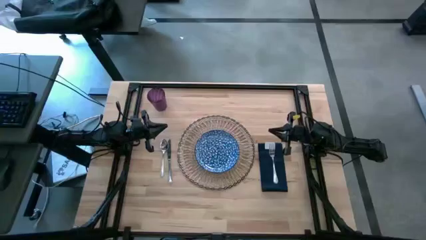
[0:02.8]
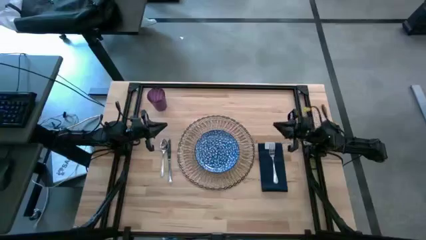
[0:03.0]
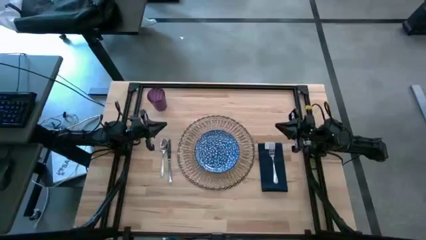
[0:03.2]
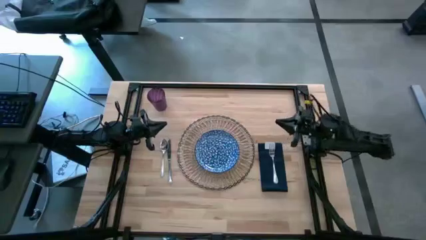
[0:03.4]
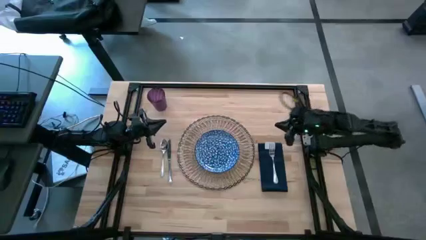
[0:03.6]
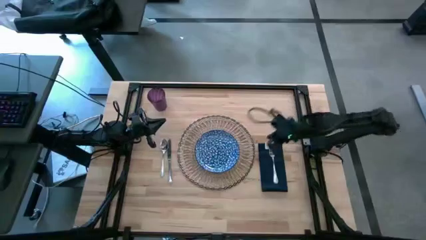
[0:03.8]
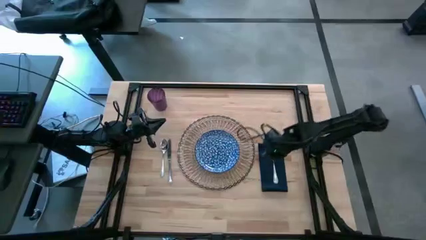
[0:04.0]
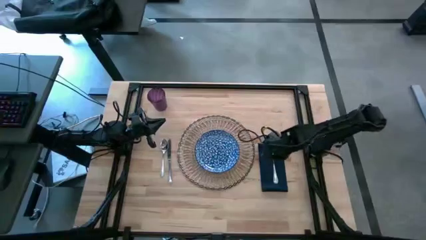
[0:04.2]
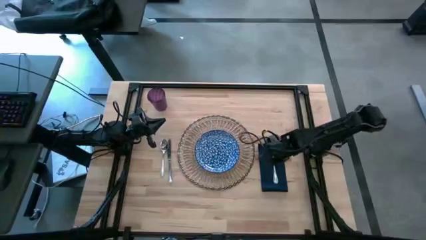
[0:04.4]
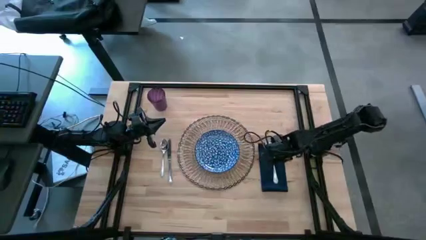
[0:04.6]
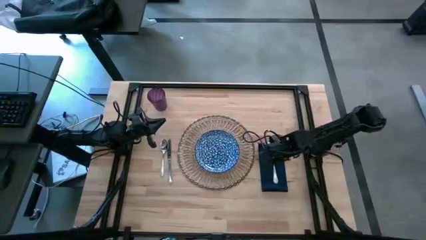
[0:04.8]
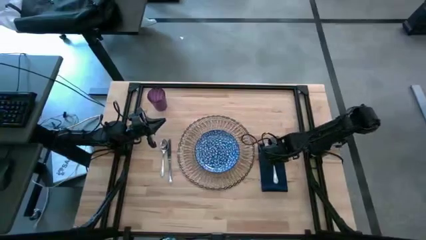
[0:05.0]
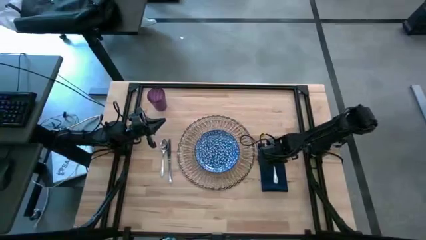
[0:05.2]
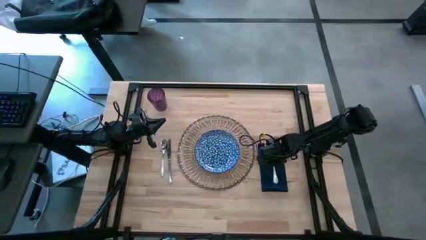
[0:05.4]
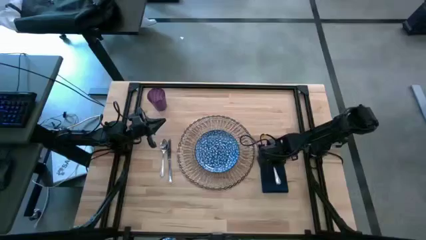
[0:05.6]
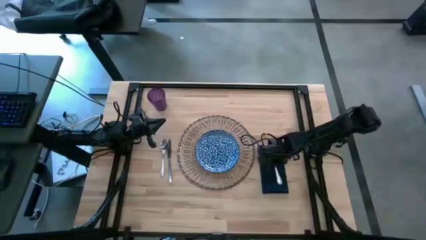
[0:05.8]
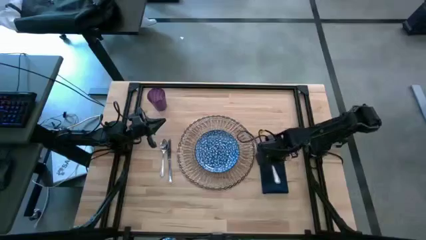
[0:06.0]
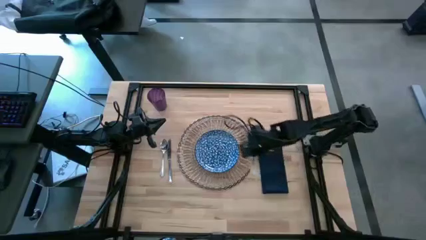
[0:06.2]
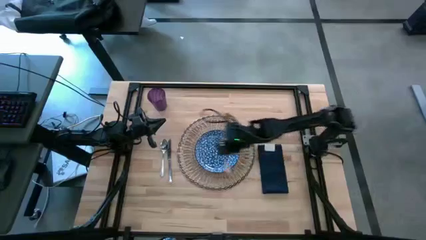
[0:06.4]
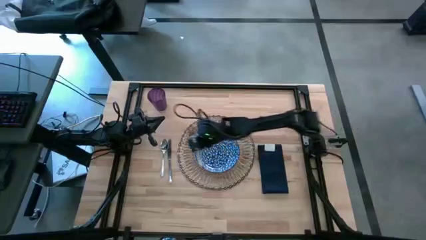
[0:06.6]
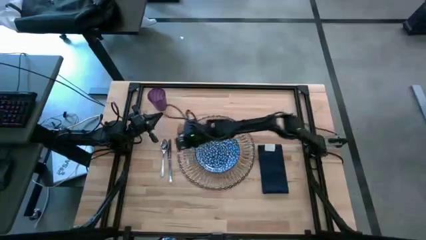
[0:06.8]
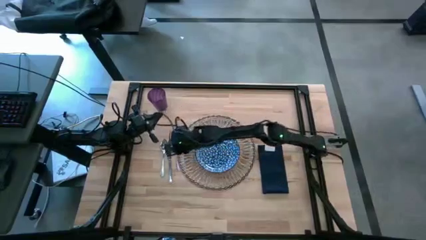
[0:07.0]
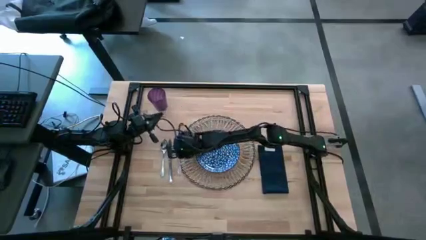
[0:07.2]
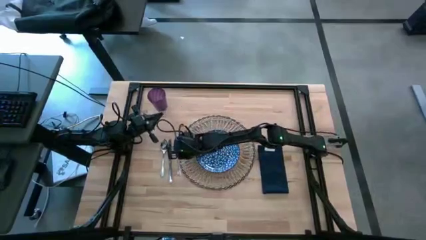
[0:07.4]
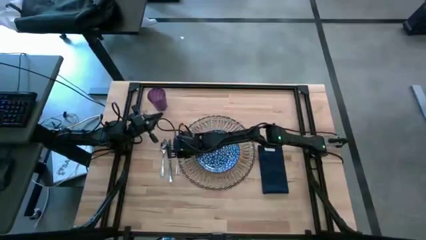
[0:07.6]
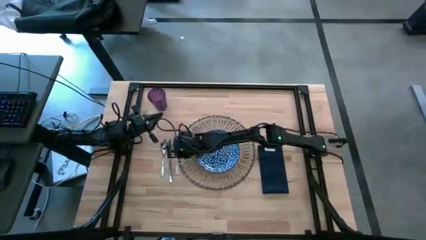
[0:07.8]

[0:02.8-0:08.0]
Task: Set table place
Move the fork beside the knife

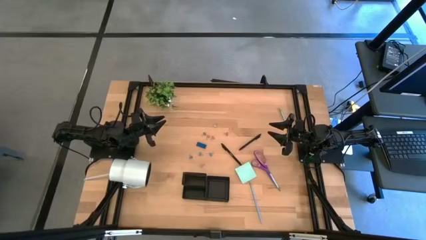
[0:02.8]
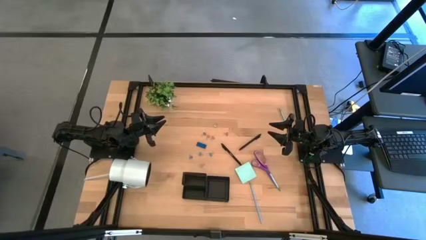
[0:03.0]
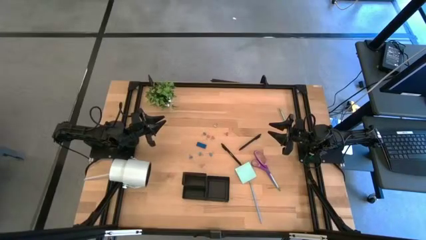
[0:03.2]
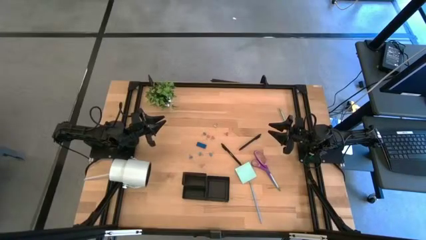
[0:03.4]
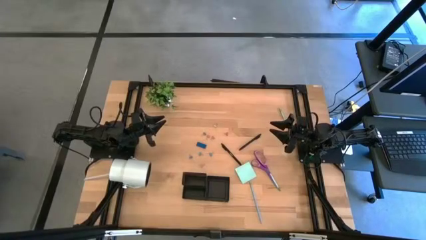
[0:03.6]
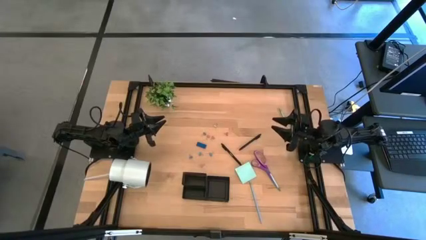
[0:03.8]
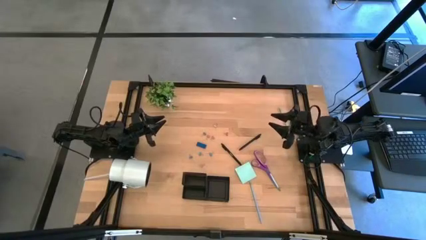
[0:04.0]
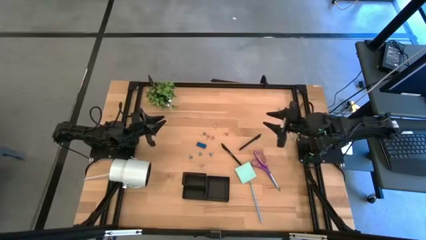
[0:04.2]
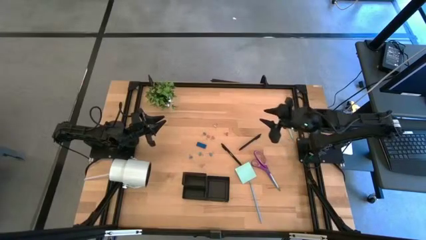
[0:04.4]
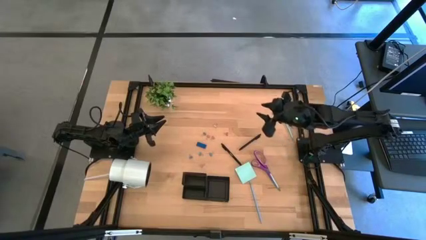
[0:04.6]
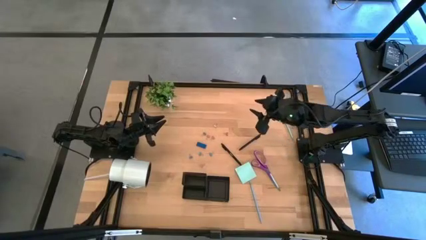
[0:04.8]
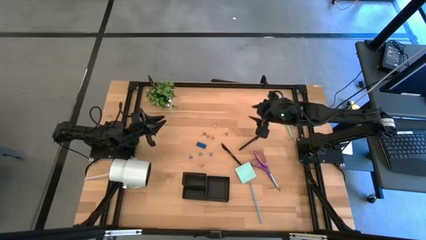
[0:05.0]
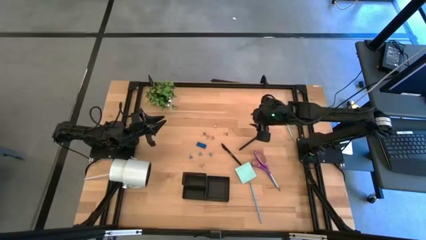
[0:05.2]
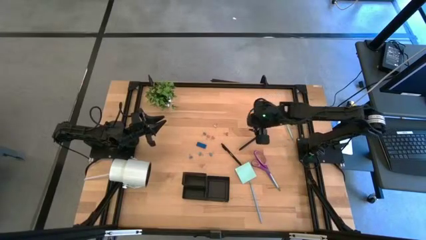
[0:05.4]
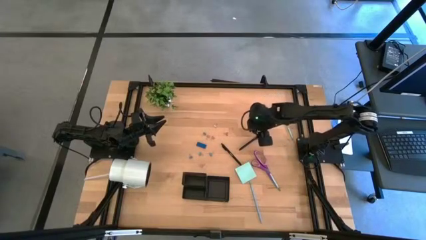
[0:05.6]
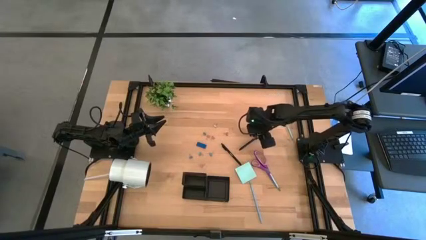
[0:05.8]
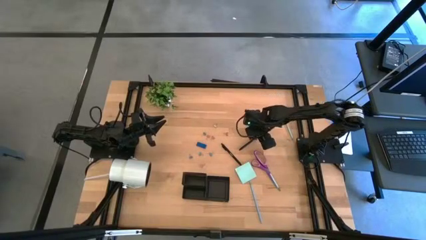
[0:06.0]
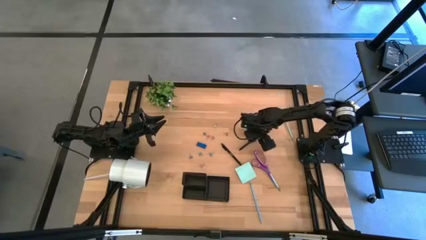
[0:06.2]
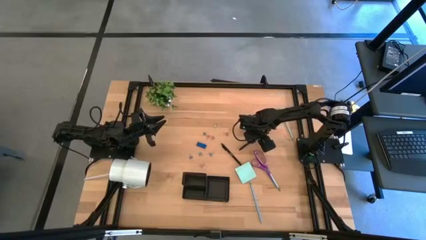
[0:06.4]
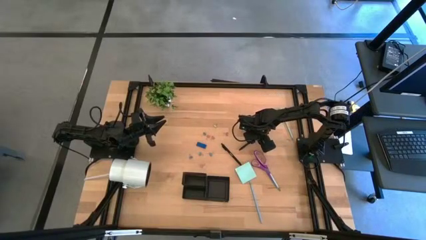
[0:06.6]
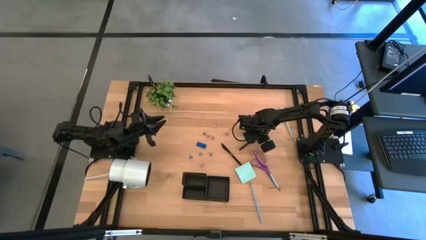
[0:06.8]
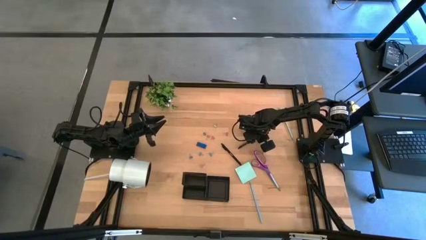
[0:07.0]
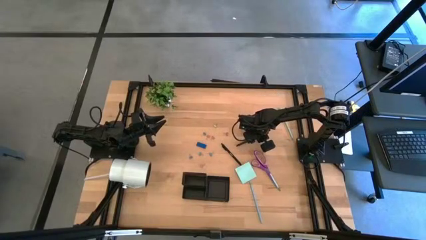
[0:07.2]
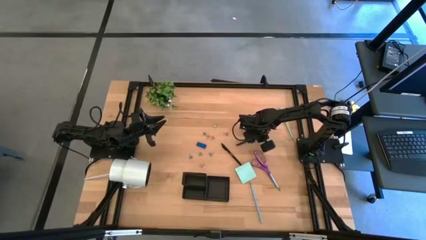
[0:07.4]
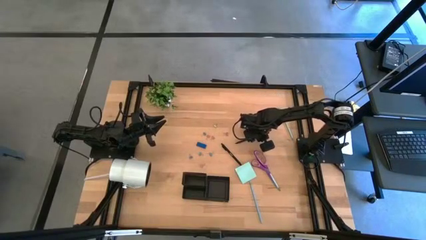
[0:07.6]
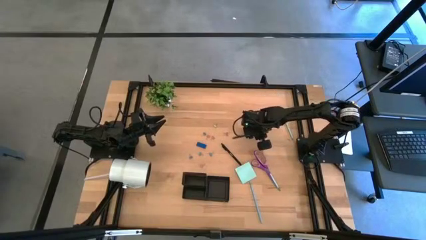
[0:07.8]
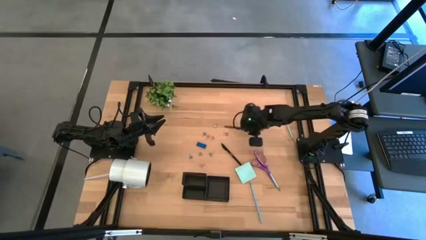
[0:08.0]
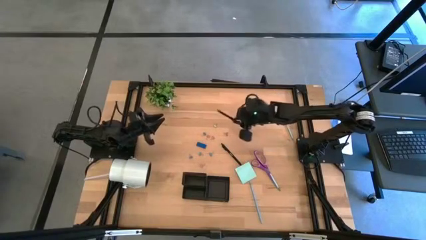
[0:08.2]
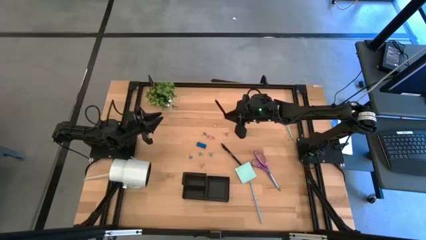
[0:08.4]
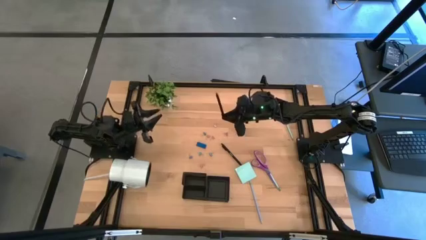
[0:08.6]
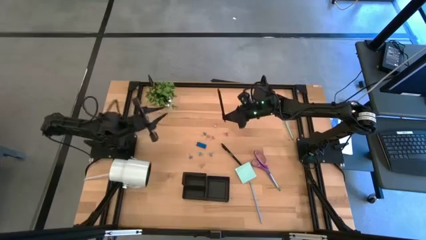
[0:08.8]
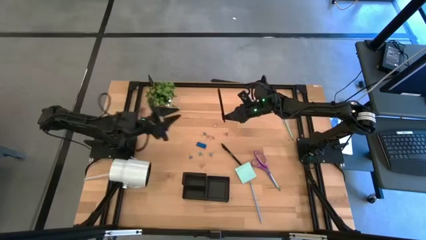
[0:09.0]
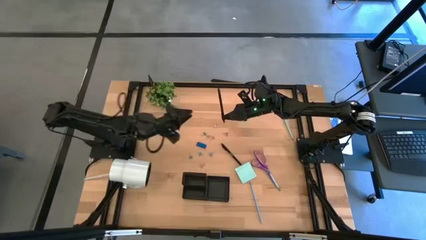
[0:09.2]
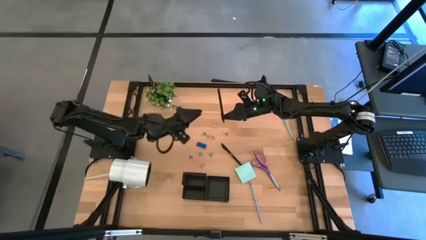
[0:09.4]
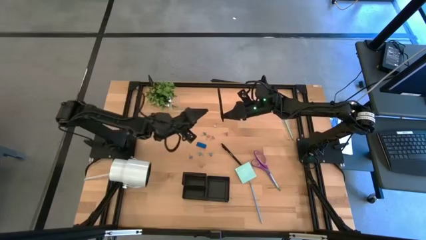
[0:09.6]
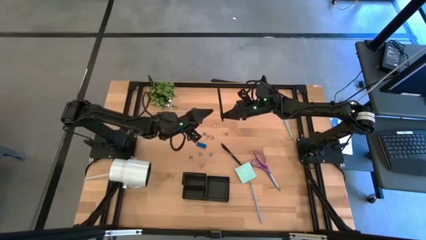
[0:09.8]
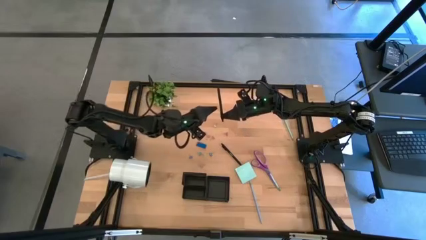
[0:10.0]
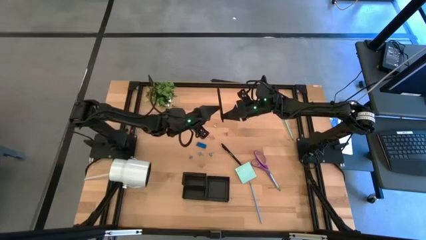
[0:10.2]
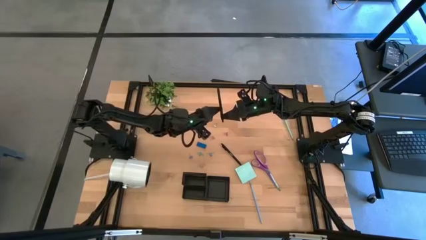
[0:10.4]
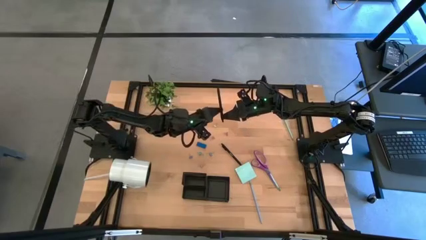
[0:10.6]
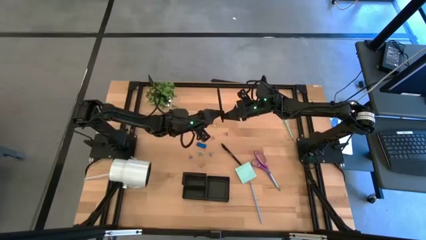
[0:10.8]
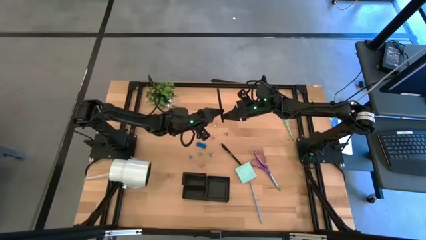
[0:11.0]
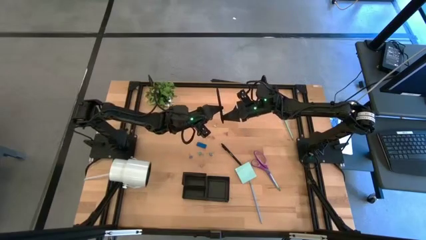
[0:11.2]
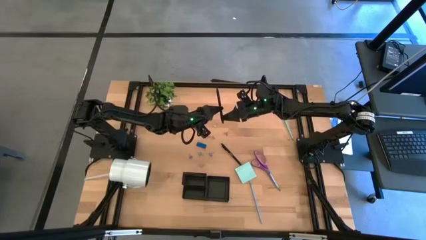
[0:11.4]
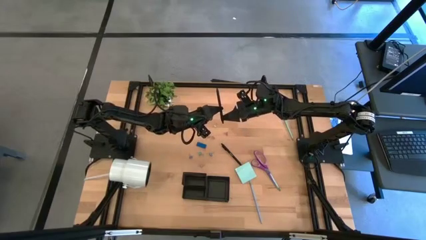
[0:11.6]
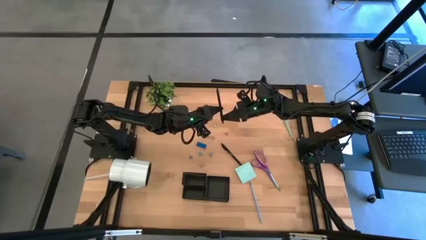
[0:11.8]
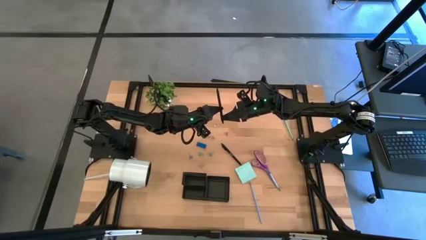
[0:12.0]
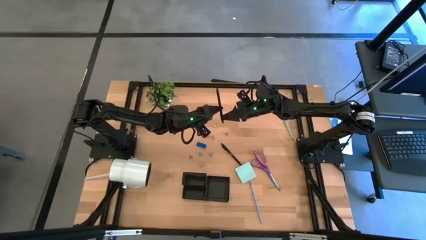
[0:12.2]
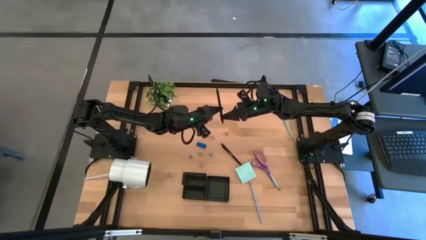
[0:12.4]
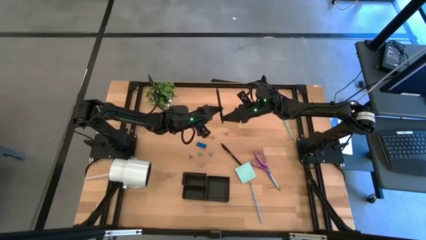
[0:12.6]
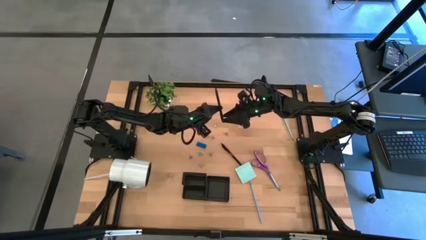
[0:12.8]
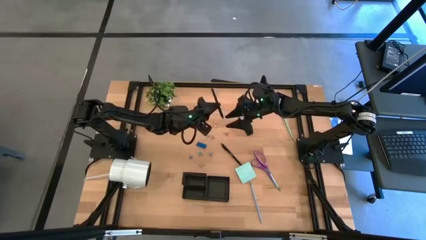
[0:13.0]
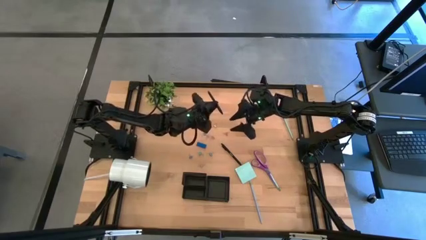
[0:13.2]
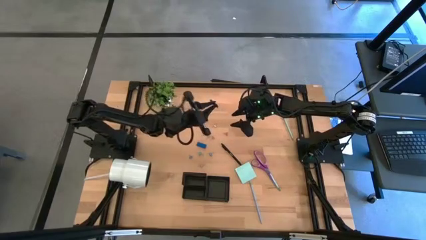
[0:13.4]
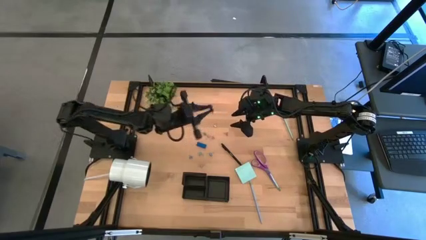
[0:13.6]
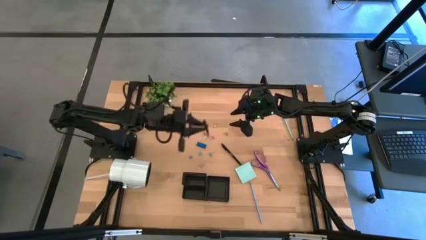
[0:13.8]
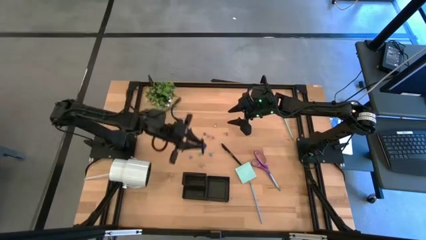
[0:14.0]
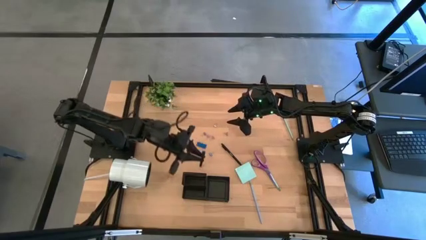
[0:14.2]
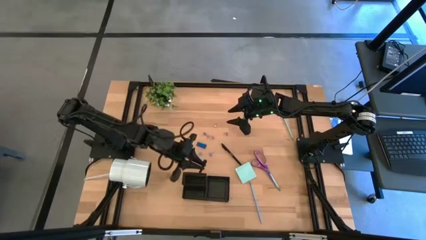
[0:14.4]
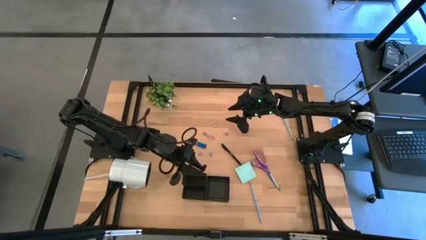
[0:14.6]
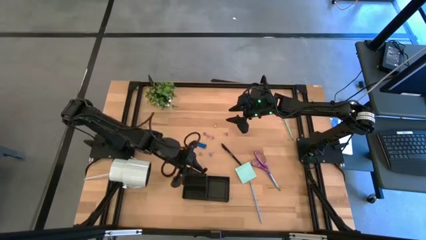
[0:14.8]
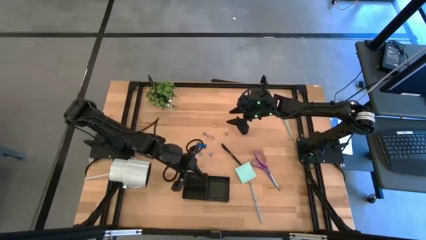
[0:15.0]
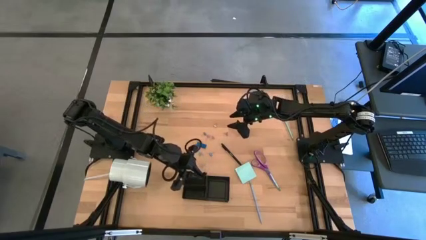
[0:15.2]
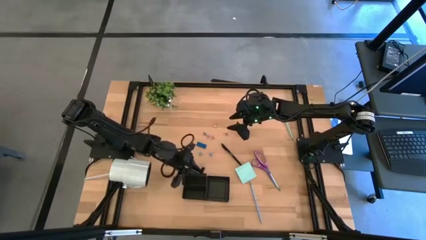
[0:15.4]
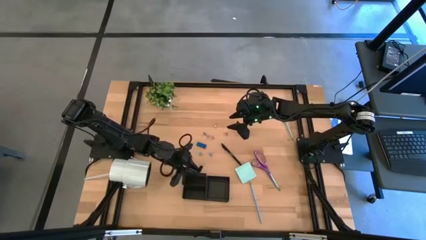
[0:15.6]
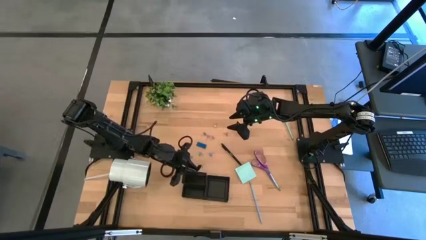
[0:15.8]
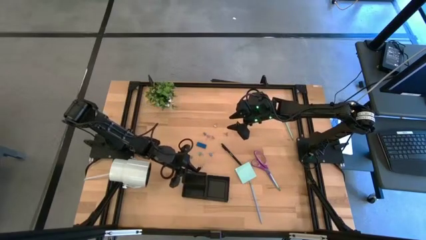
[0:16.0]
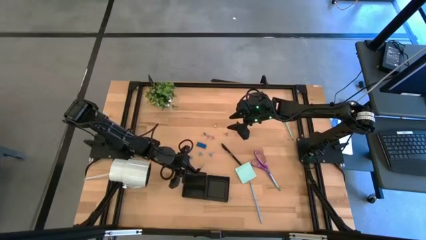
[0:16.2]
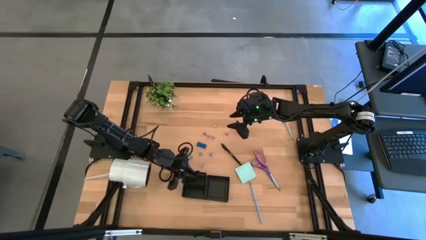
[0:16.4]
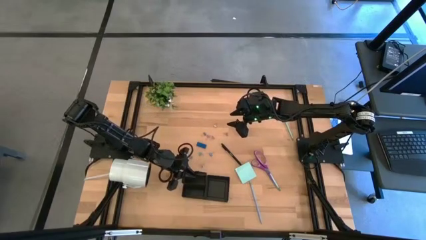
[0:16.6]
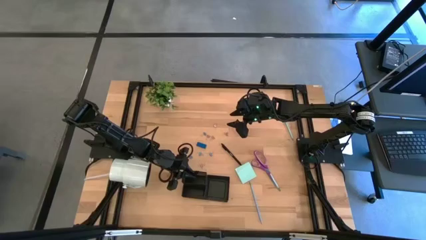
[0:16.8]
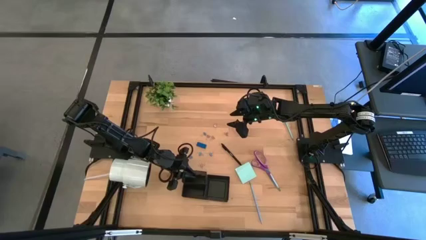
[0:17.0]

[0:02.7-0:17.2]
Task: Pick and place office supplies into organizer
Put the top pen into the desk organizer
